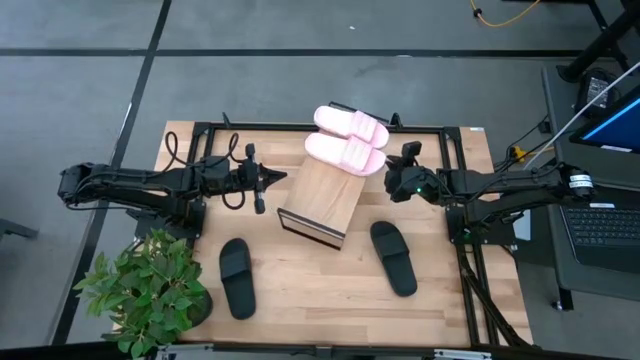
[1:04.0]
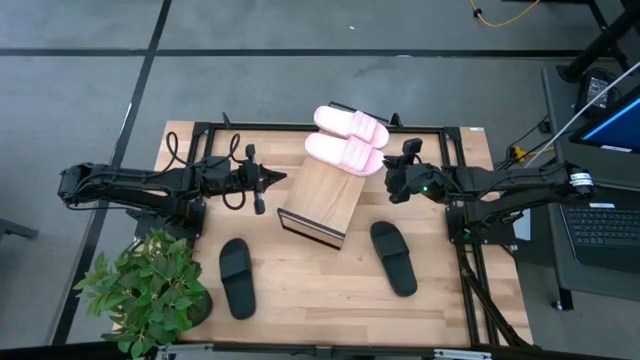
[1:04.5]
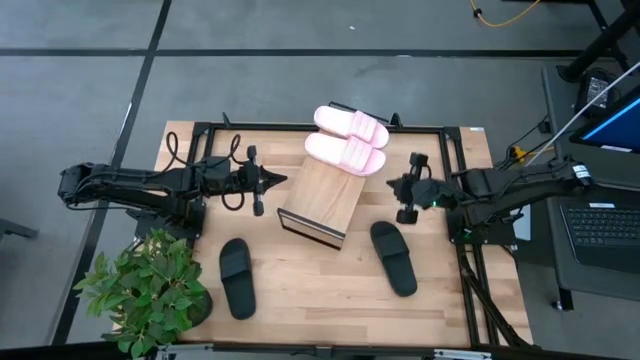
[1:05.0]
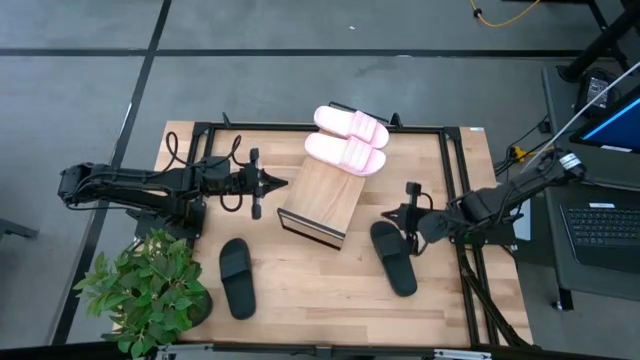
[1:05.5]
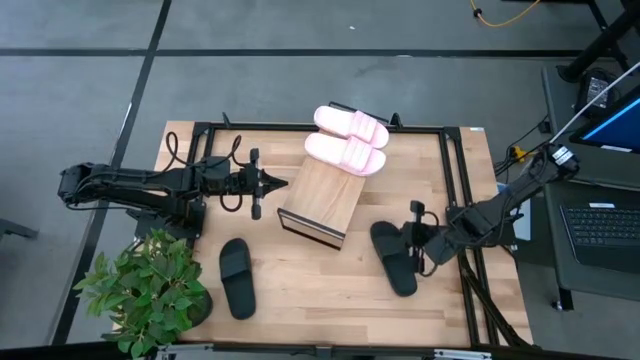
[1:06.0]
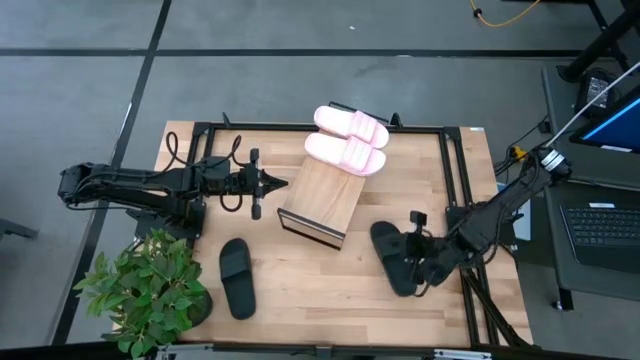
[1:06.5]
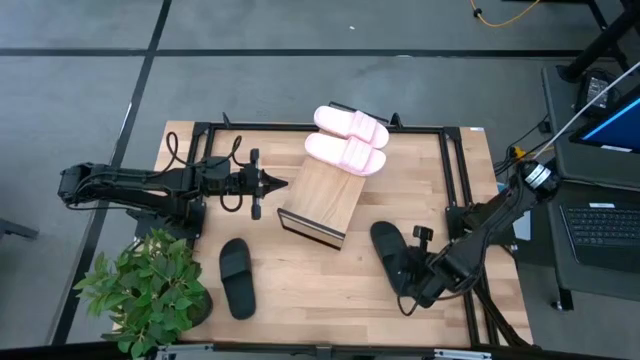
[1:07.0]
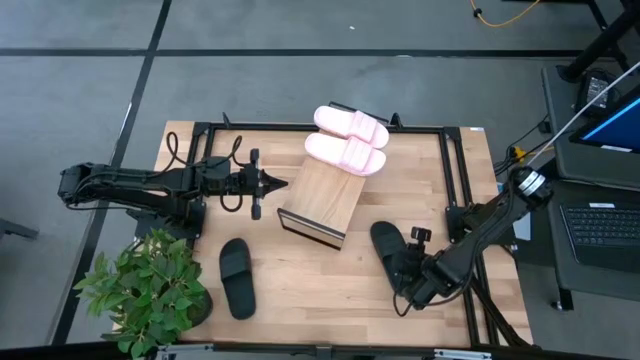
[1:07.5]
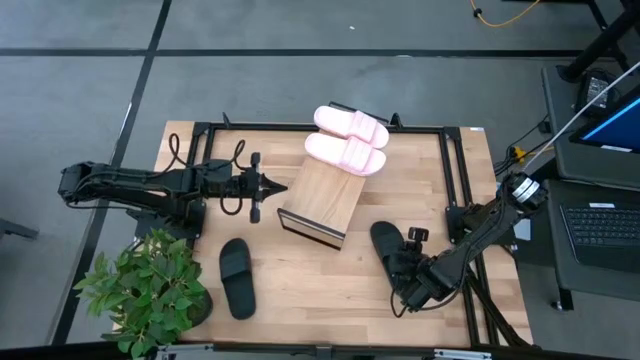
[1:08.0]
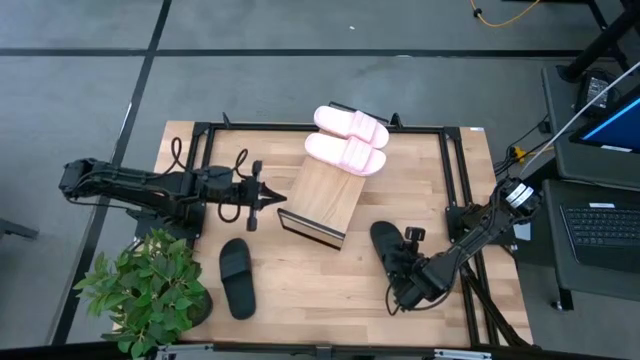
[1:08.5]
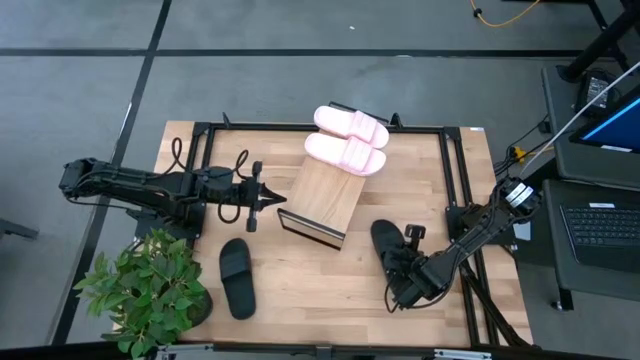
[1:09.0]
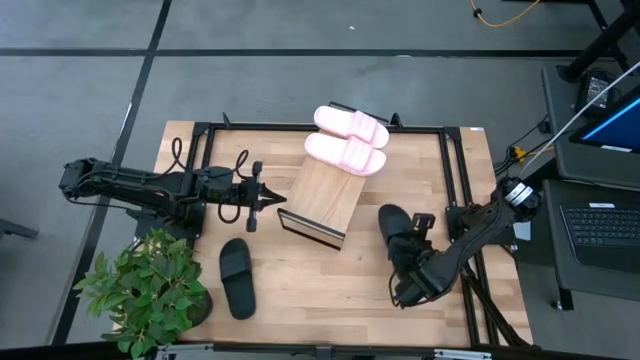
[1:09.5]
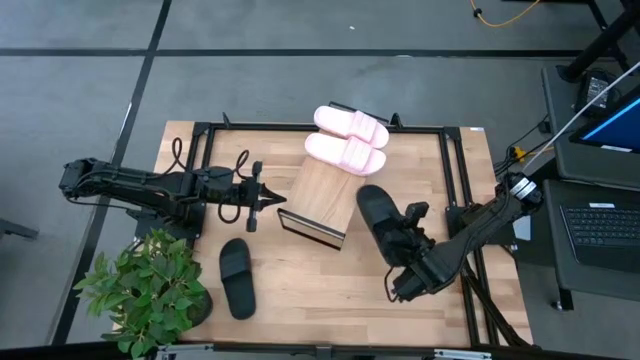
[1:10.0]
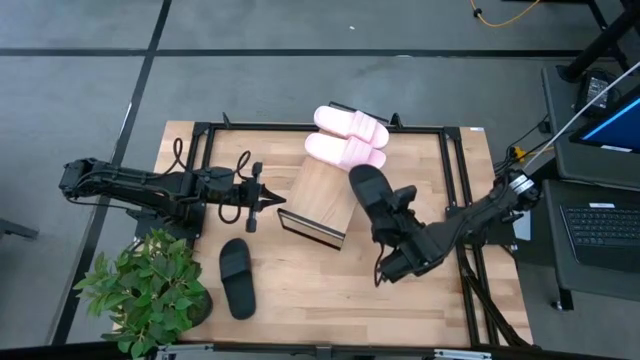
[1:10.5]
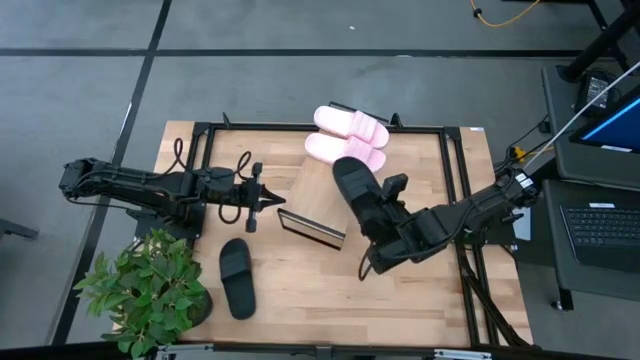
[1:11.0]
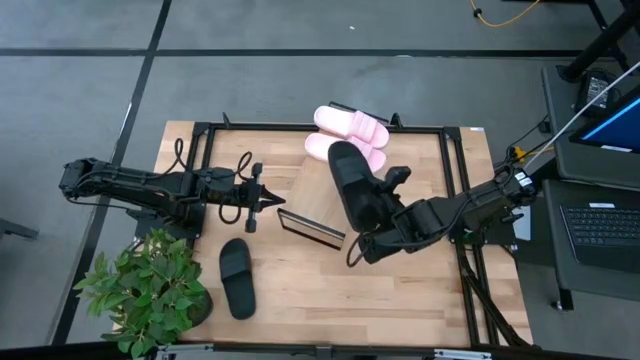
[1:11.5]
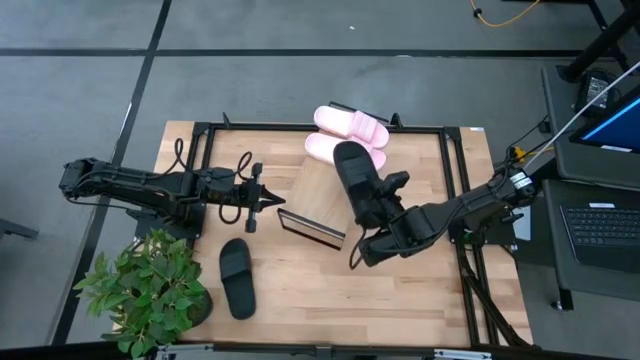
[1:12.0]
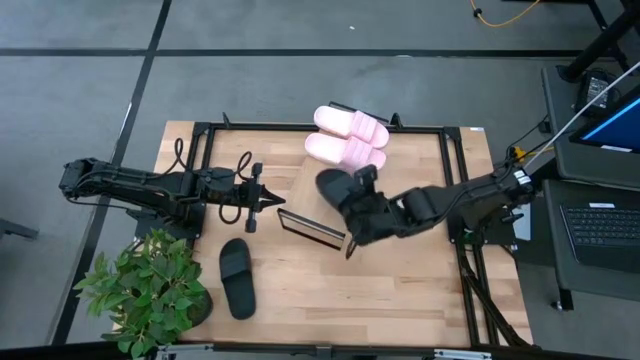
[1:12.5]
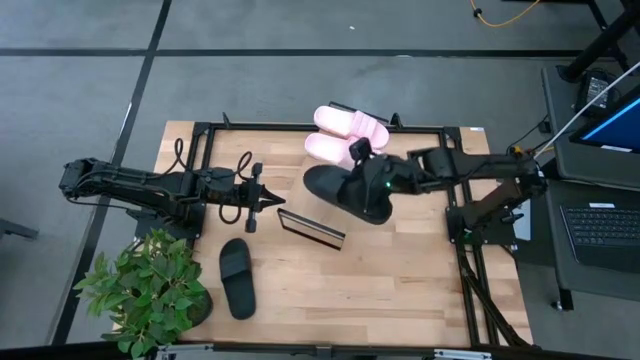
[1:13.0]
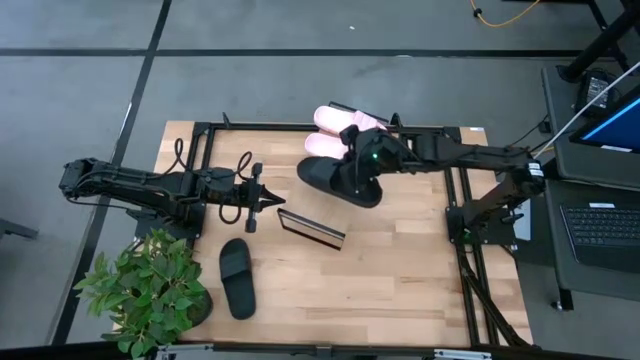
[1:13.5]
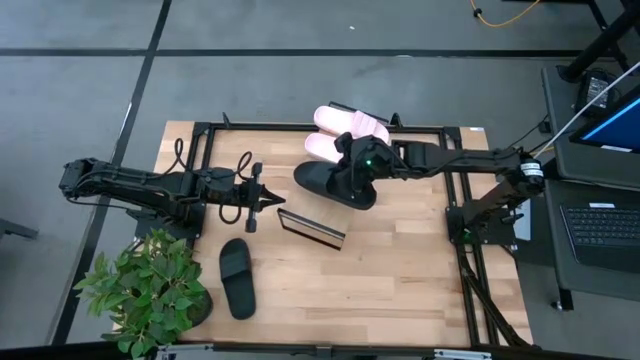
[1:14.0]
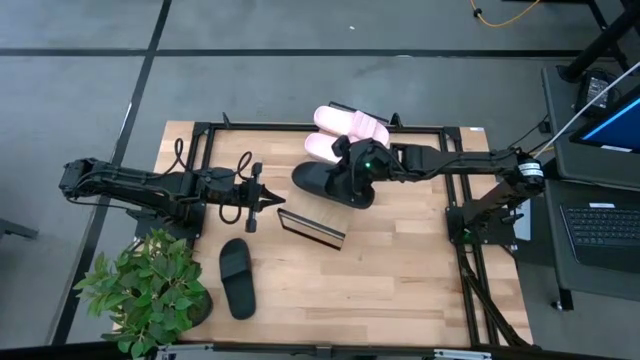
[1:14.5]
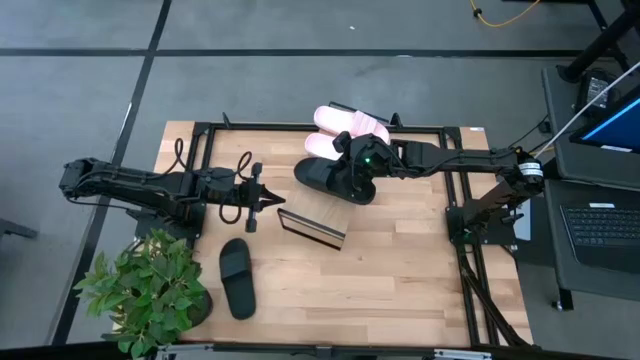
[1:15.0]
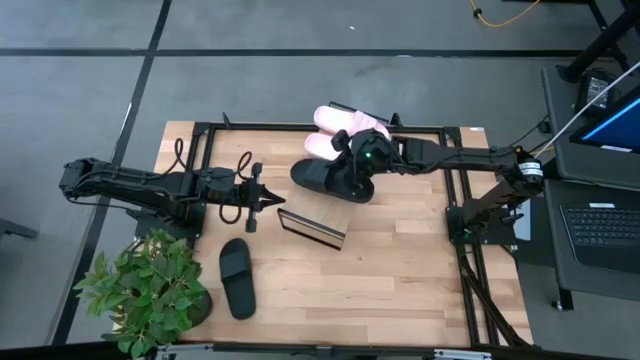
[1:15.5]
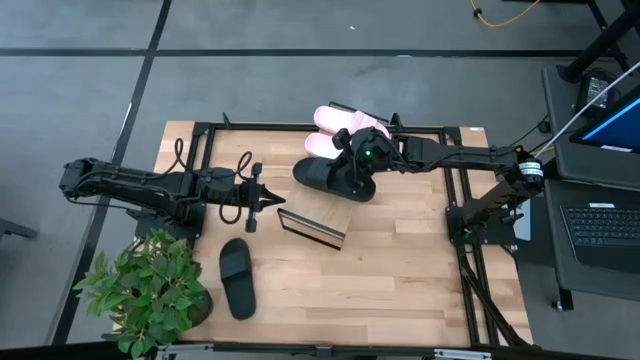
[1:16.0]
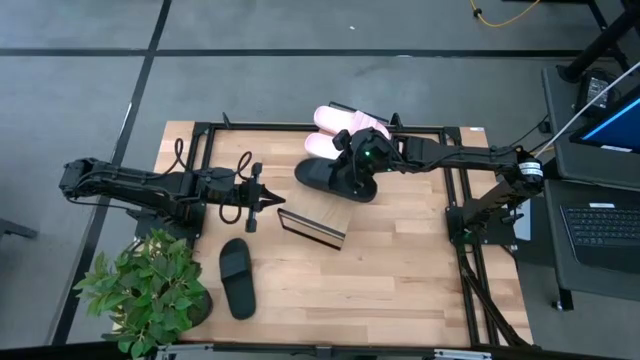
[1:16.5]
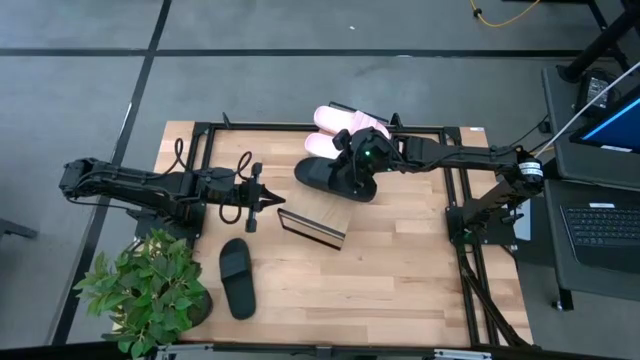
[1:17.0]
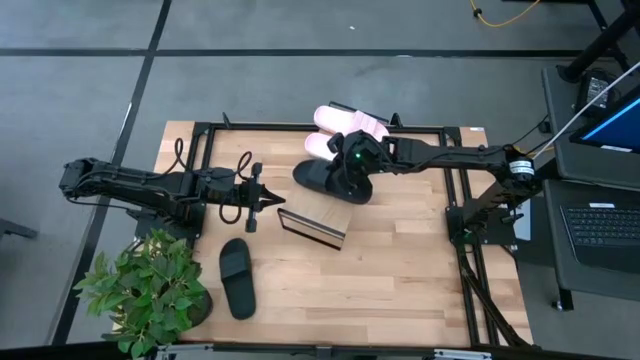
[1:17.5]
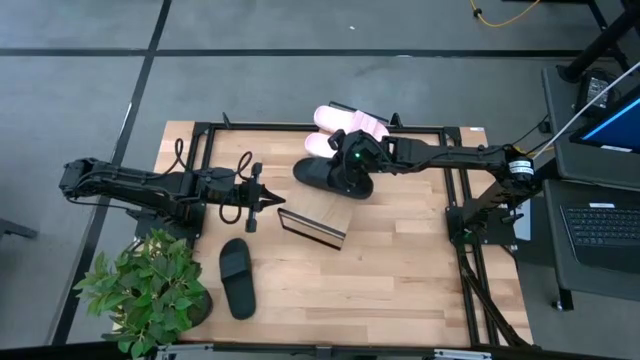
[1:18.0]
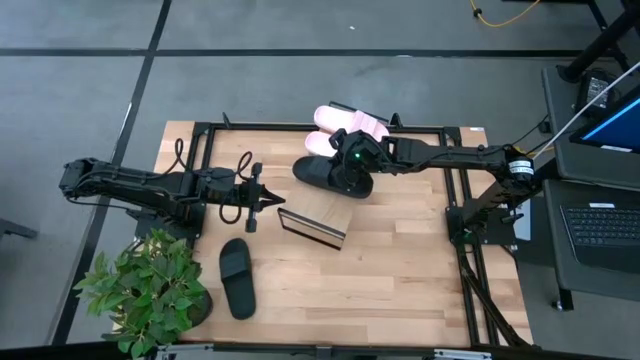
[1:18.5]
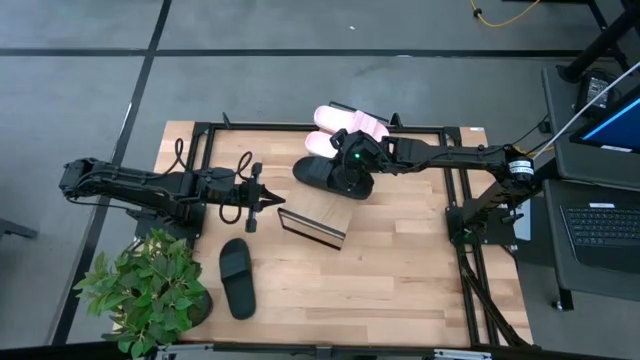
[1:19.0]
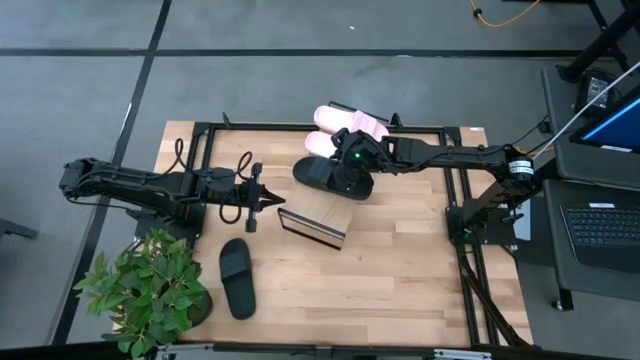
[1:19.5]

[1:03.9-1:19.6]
Task: Pick and place slides into the shelf
Put the right black slide on the shelf

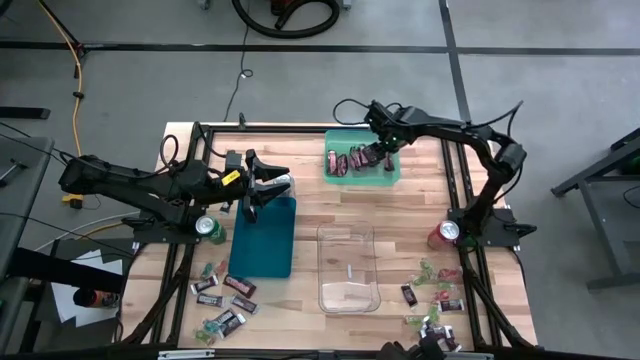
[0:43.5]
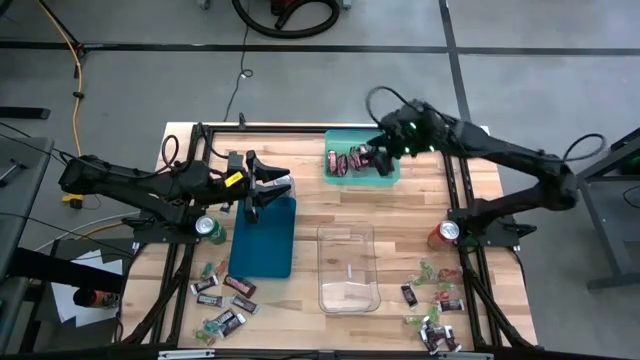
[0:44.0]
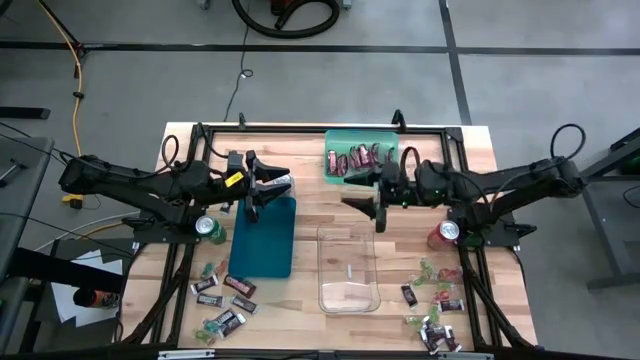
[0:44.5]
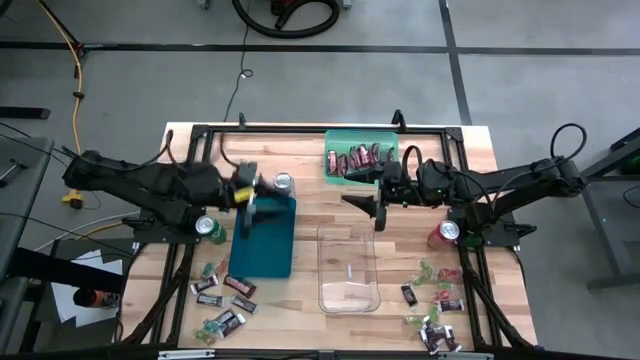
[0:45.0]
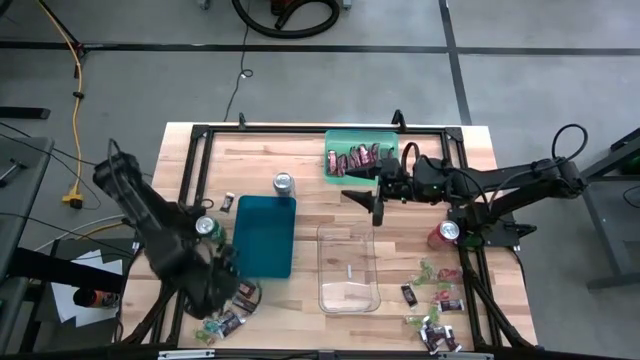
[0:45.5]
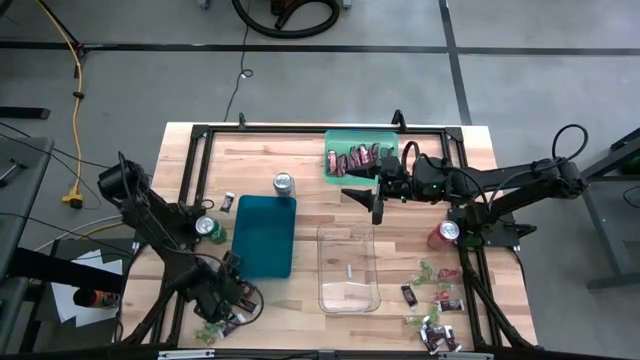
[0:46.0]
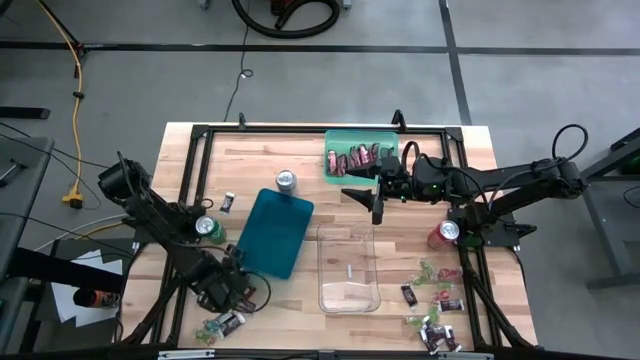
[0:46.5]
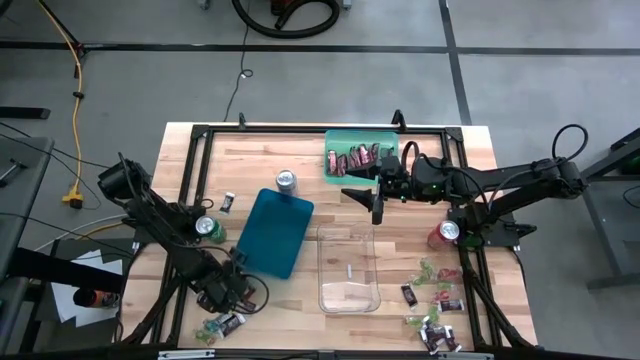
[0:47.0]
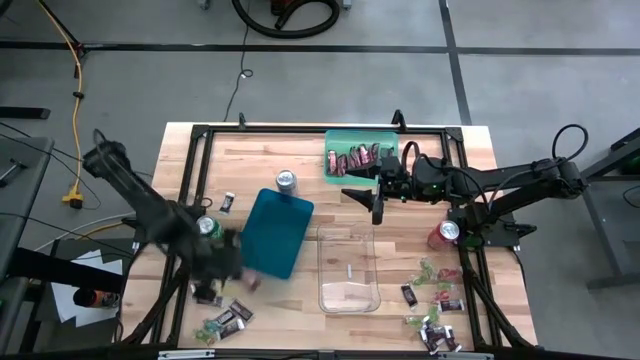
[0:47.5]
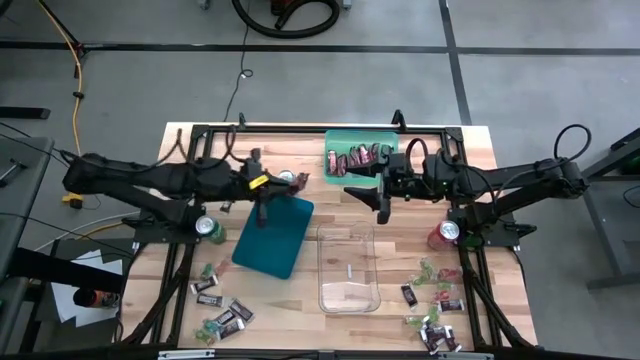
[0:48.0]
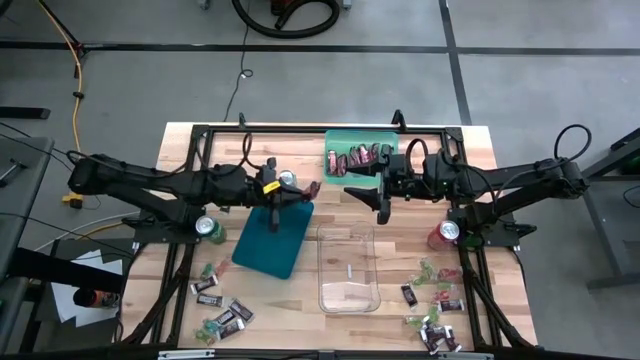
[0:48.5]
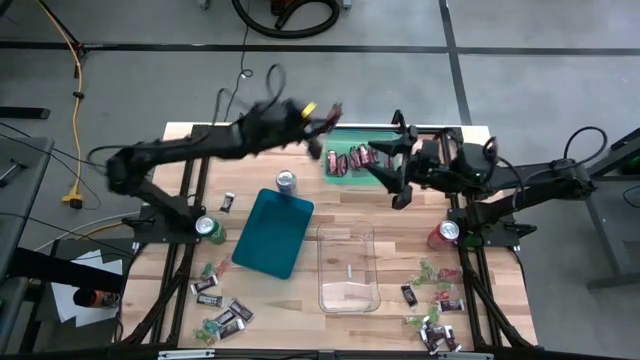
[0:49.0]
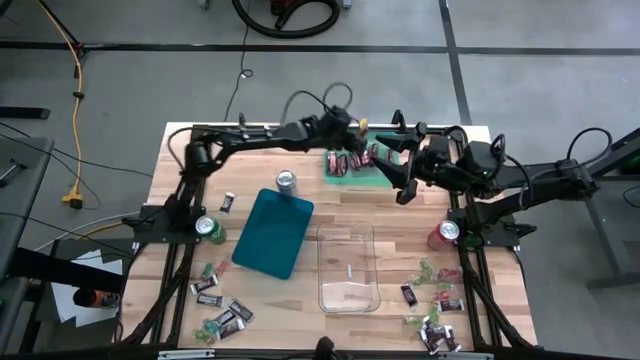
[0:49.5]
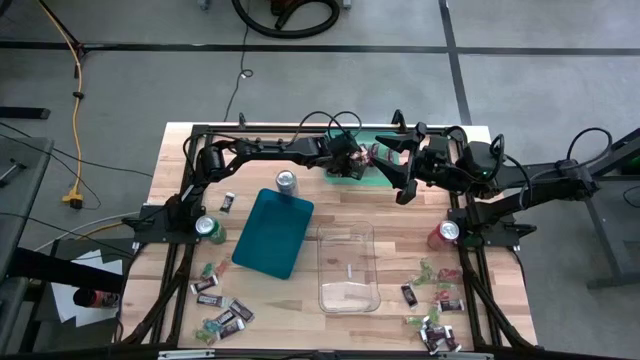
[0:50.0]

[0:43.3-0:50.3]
Task: Sort candy
Put the chocolate peanut bar into the green bin
